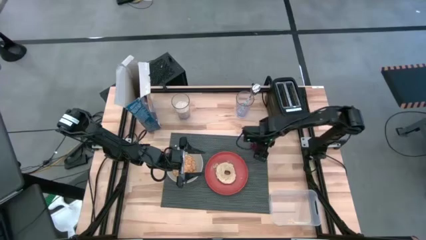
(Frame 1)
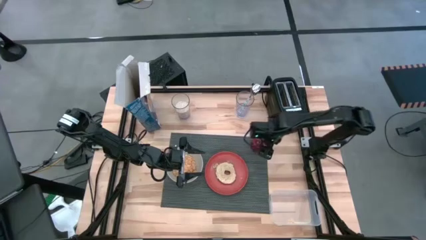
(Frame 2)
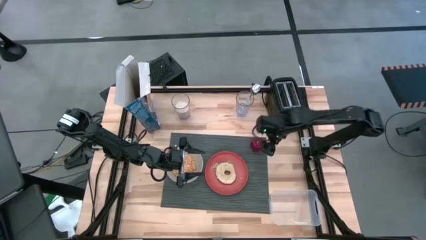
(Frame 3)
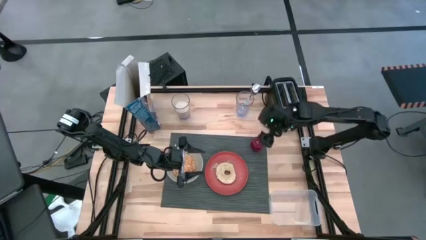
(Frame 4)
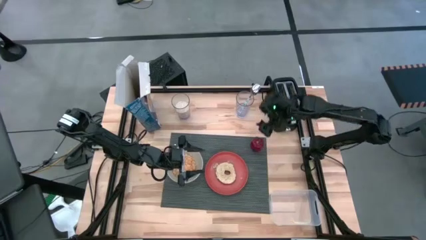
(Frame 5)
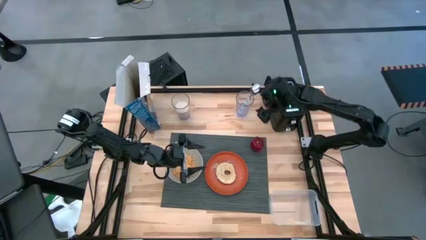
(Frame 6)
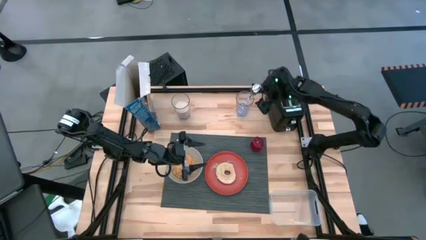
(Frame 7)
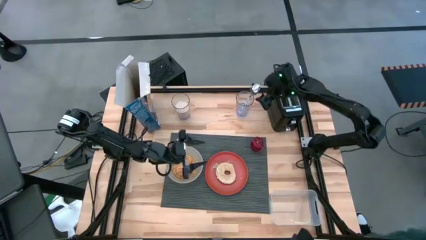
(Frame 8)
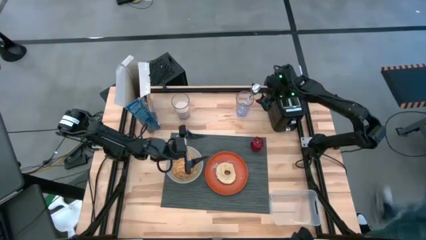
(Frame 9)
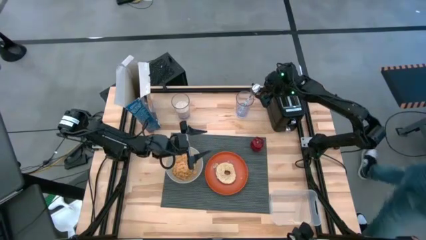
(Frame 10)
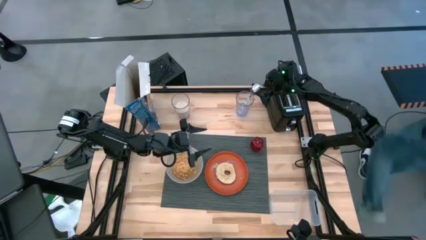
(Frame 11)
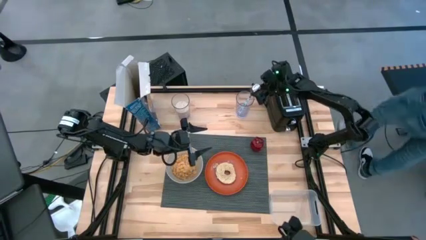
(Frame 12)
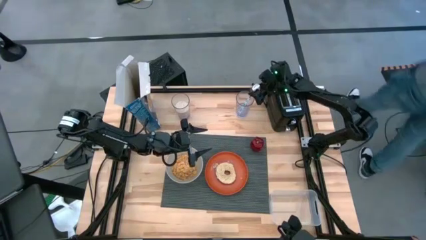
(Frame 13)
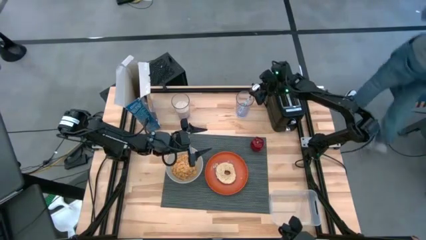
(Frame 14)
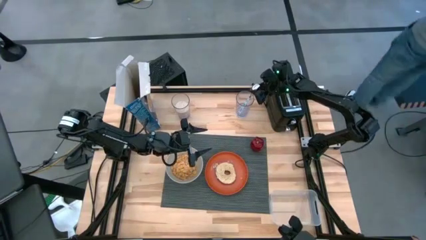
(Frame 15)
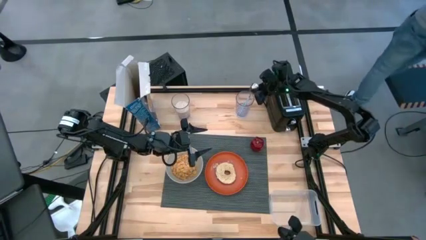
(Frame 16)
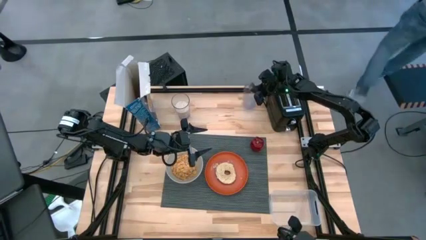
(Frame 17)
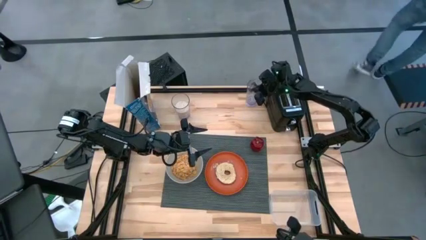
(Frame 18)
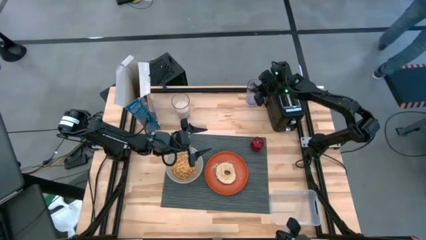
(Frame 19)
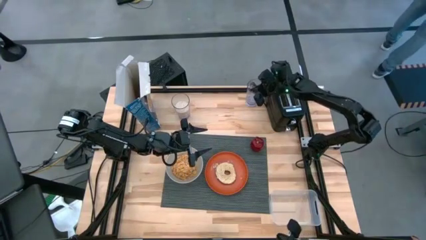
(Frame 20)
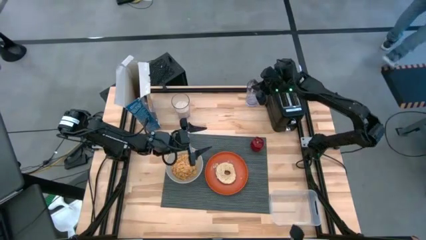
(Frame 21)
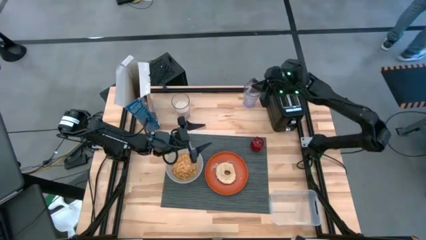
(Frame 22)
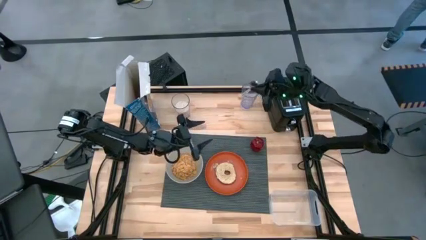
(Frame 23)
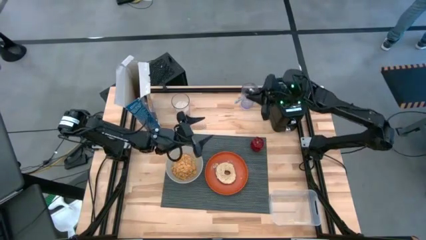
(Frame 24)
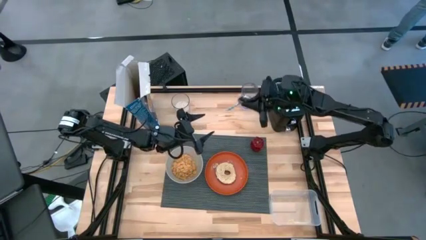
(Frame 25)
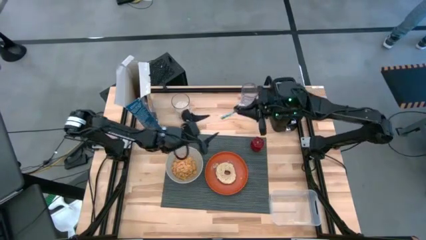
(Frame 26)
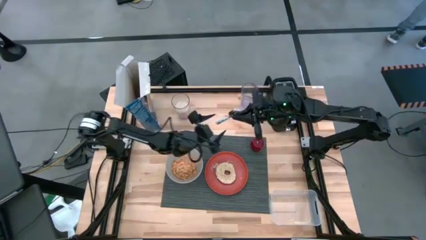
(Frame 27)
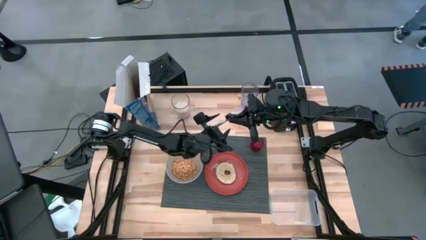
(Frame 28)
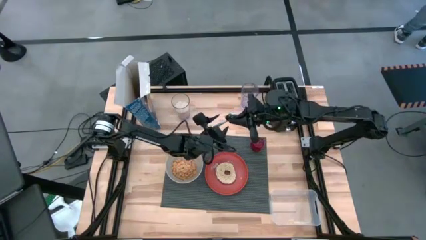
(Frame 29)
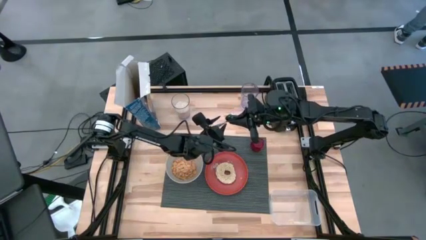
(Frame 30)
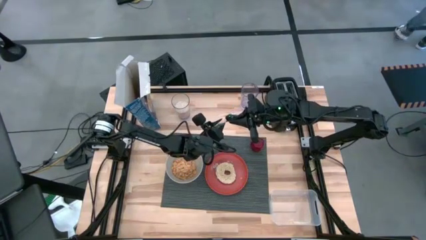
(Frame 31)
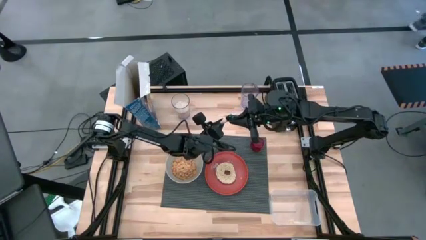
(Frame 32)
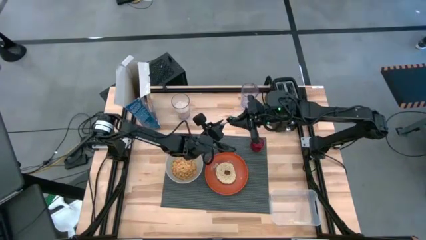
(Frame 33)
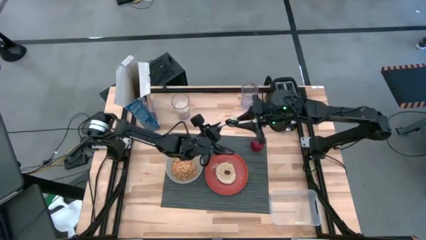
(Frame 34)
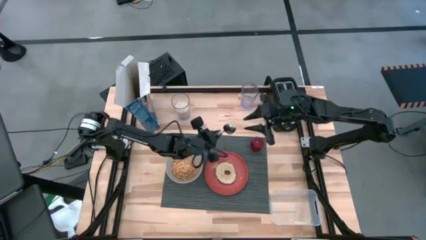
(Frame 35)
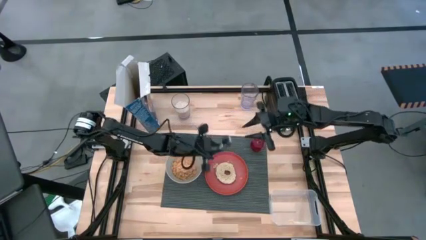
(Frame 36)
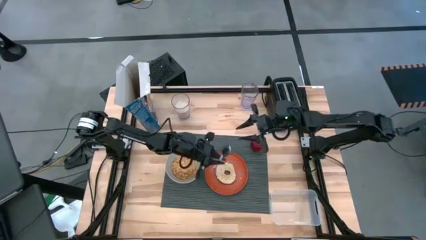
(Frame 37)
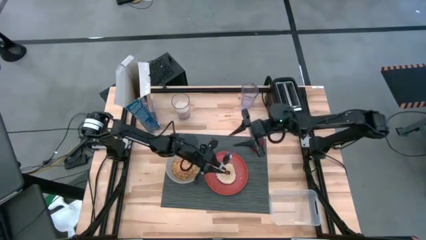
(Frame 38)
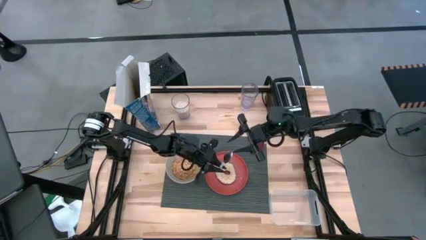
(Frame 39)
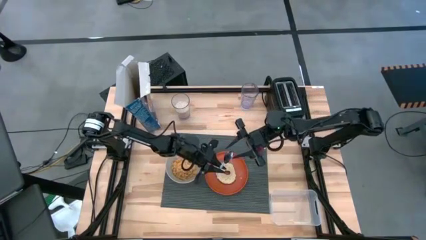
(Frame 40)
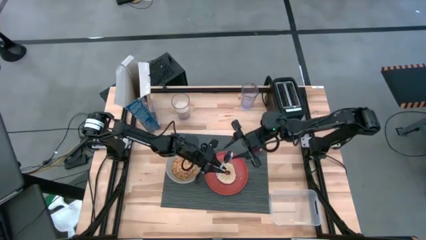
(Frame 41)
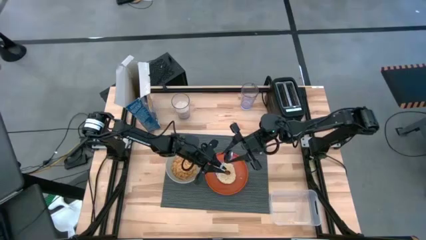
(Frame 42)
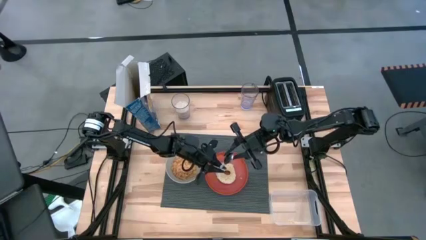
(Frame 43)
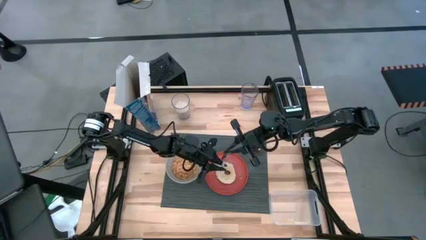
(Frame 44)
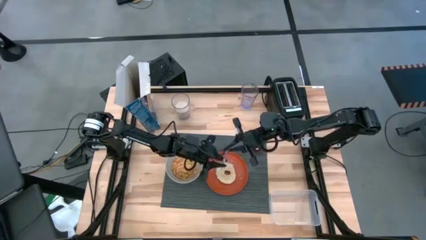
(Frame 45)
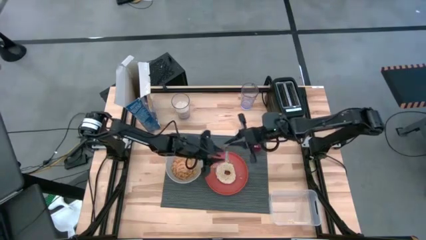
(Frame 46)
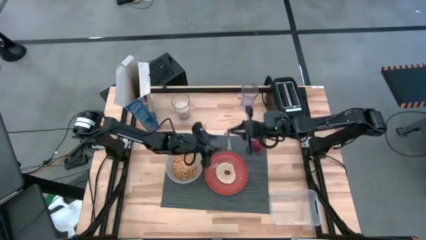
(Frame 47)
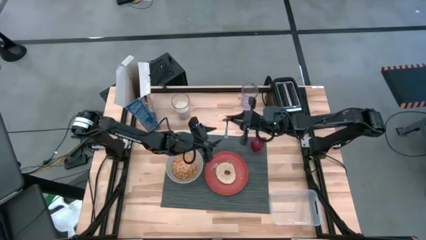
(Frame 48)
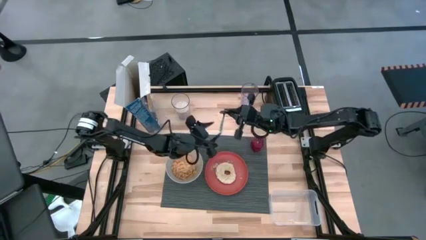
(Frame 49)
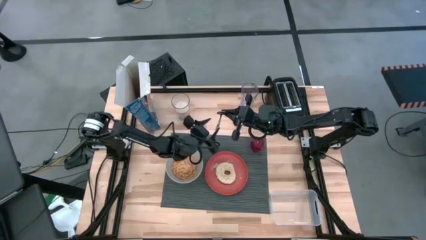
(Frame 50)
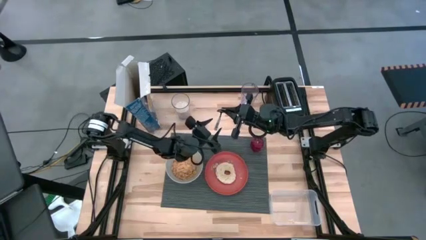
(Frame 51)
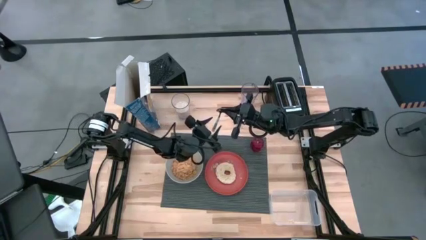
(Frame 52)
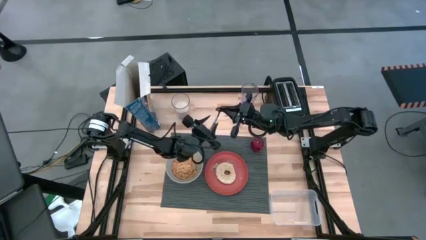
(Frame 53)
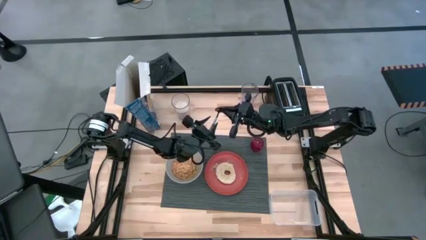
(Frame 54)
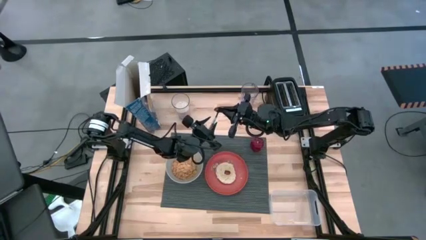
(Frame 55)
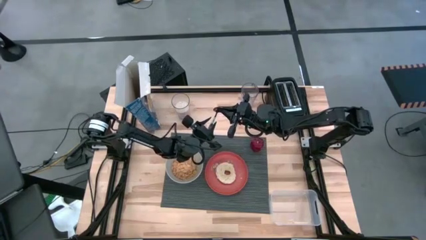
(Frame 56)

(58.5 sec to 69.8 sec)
Task: Arrange a breakfast setting
Put the spoon beside the bowl

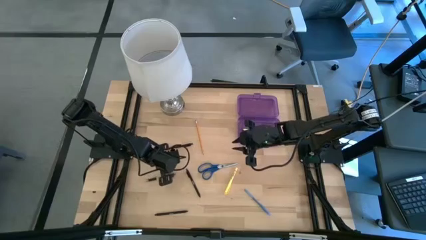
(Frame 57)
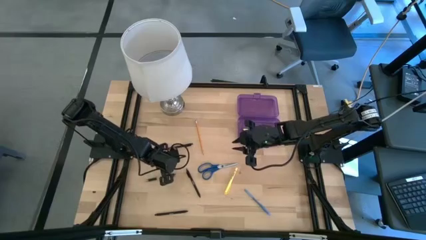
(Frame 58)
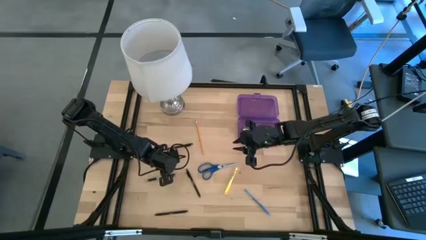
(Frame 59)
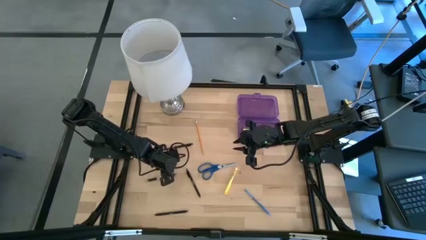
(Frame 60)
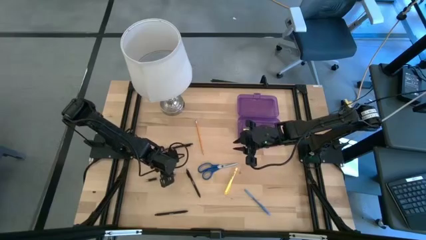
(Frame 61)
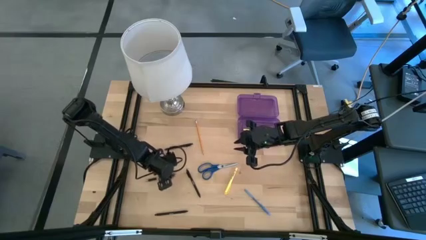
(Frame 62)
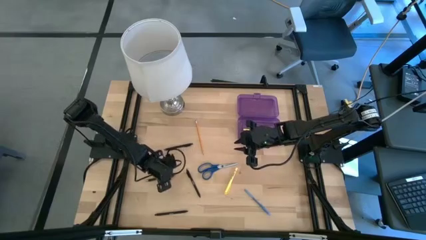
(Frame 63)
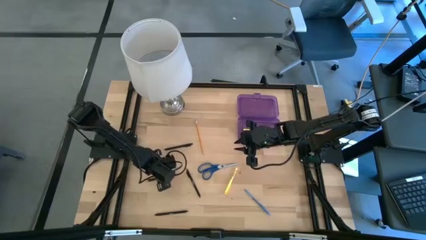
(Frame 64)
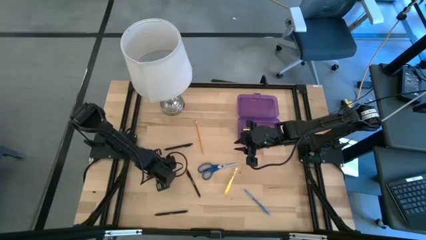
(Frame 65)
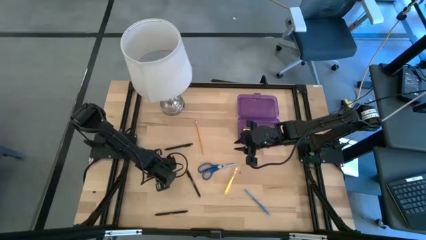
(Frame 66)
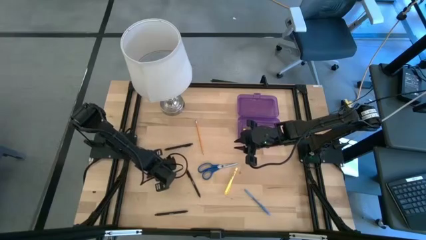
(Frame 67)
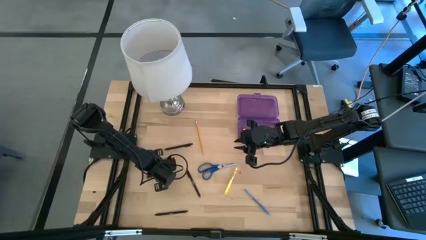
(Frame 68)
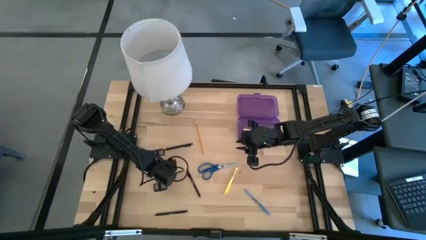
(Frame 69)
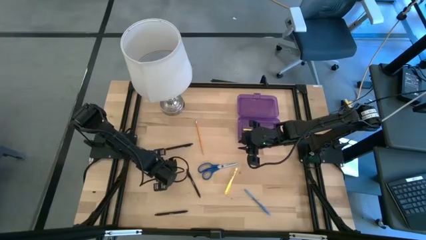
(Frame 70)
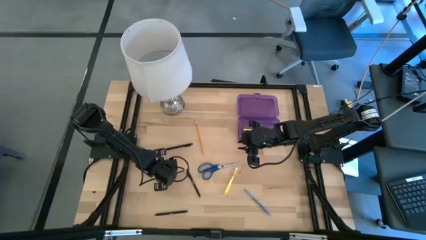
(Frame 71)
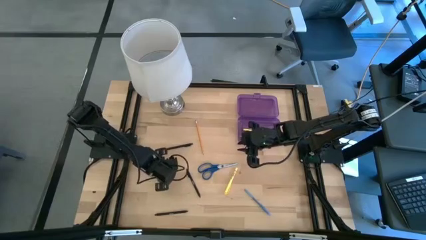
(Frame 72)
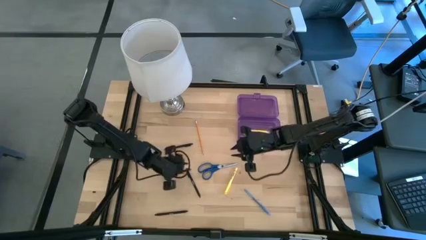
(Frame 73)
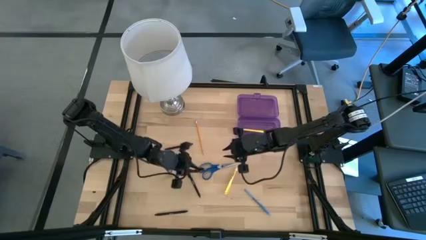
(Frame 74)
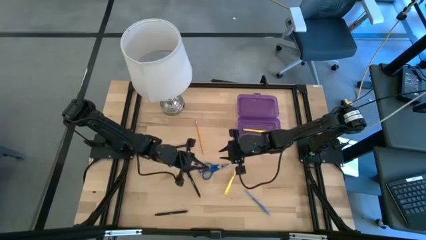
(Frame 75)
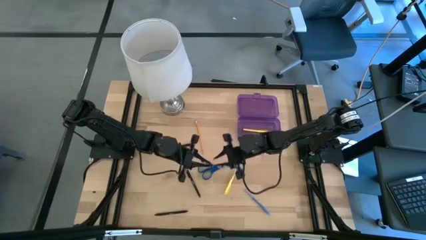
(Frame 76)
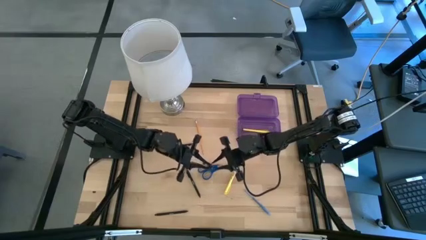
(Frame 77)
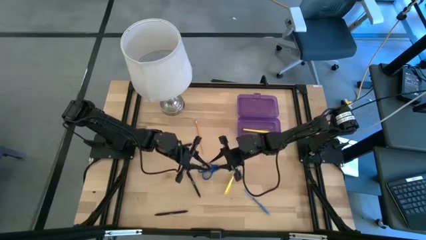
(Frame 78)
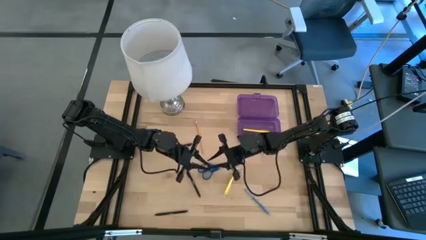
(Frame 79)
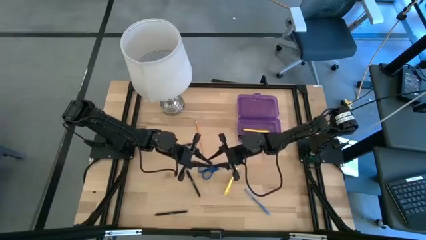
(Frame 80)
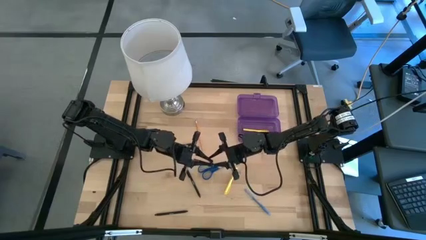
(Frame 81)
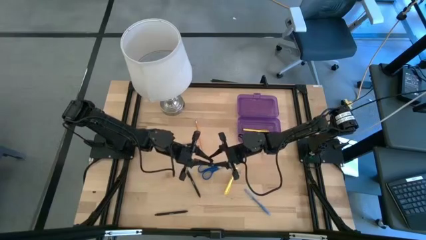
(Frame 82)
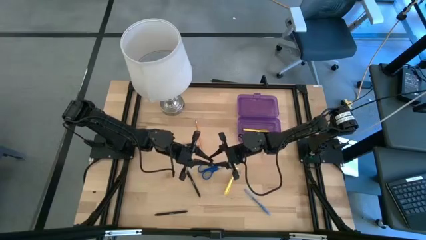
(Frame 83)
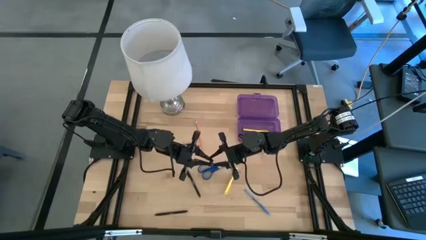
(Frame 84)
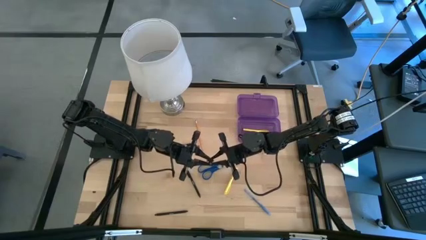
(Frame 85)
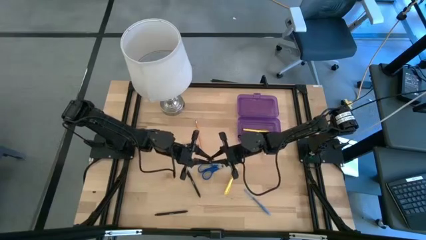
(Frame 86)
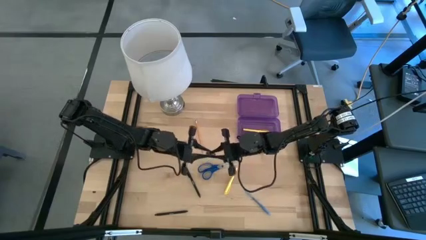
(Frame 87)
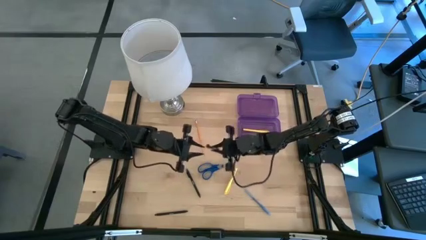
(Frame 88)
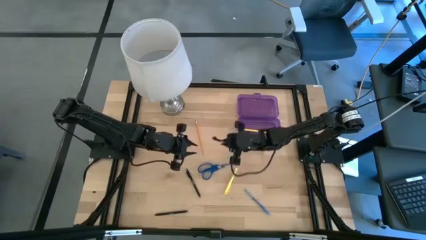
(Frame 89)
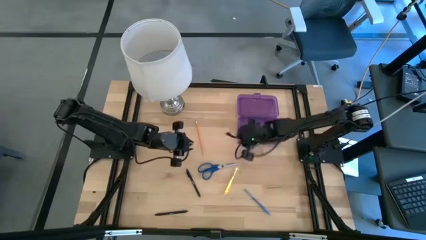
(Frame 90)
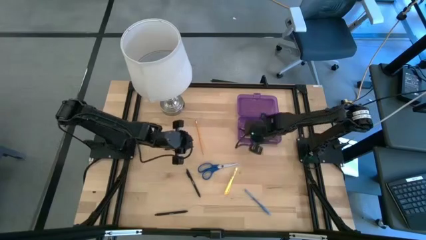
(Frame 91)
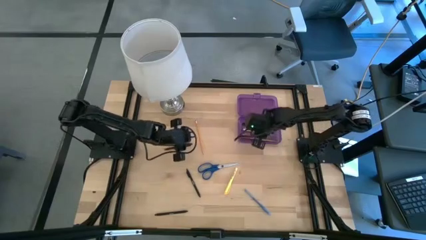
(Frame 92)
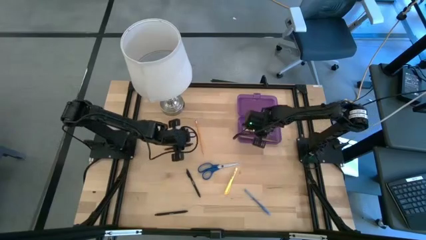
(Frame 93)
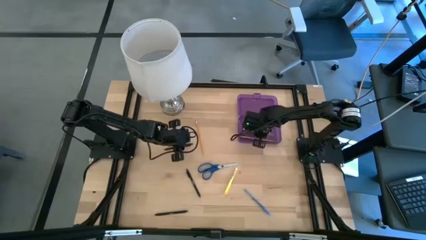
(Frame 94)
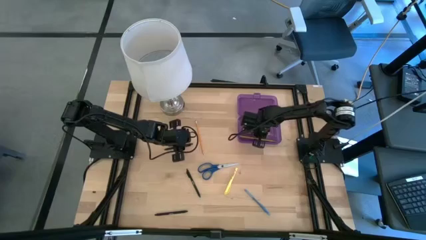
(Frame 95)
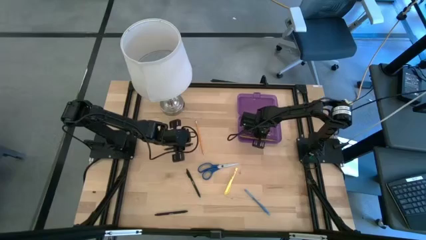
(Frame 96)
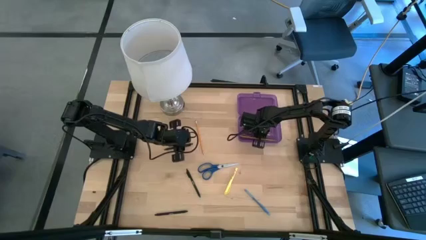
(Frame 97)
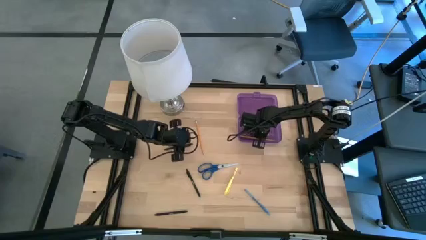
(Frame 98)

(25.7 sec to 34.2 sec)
Task: Pick & place school supplies into a supply box
Put the transparent pen into the purple supply box
